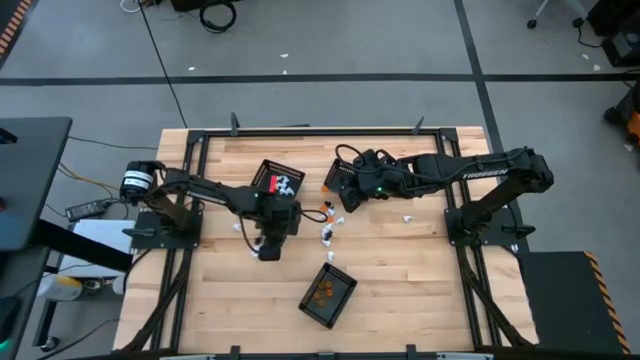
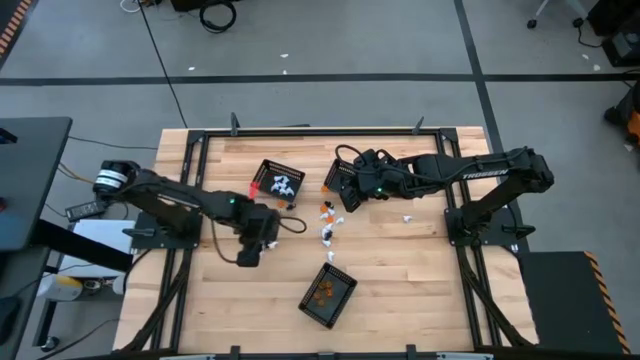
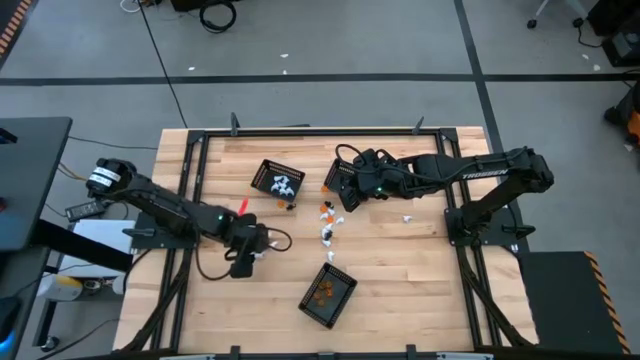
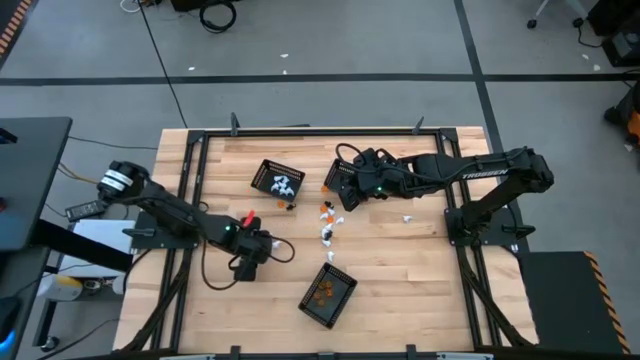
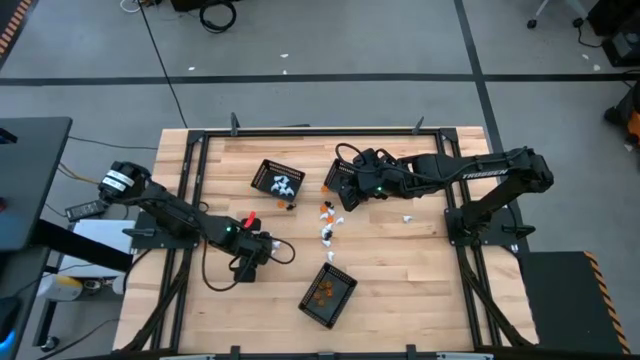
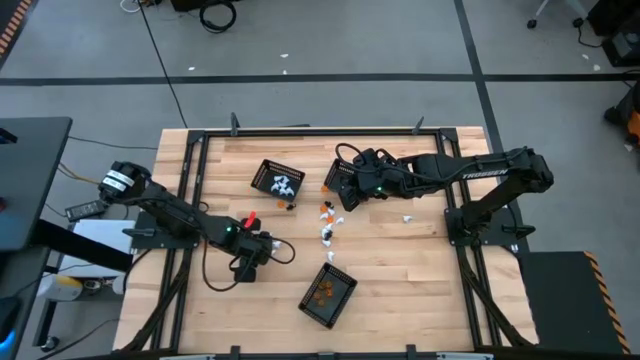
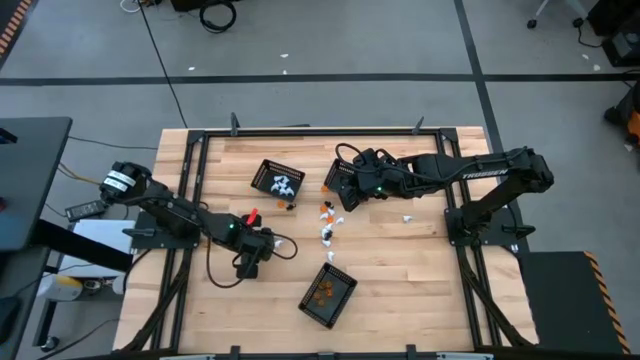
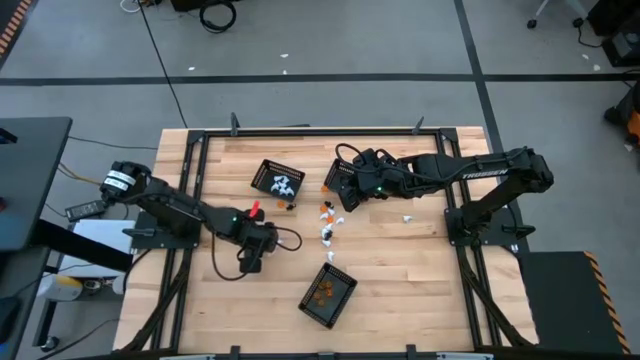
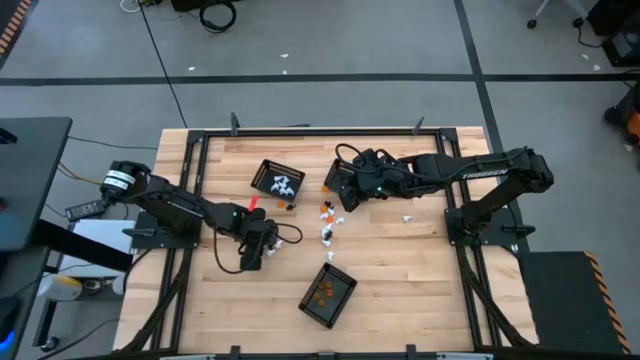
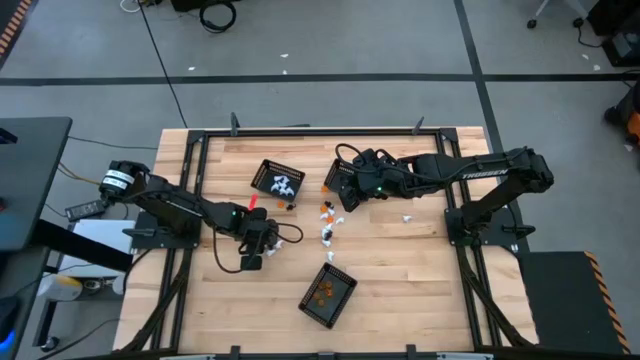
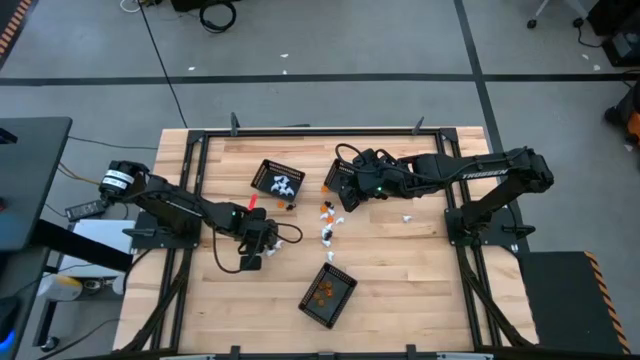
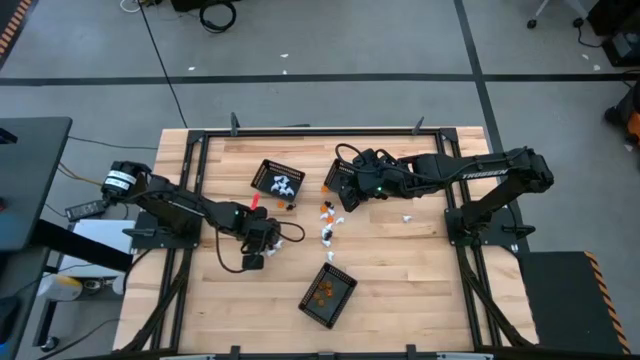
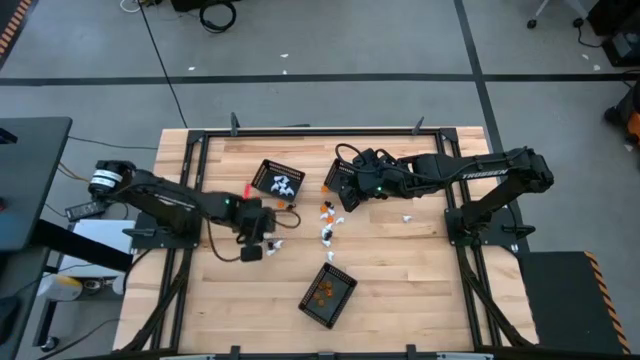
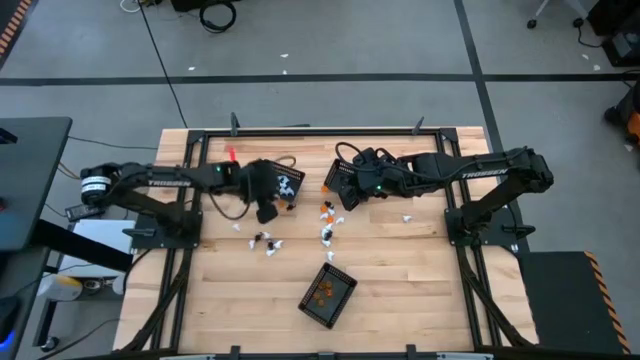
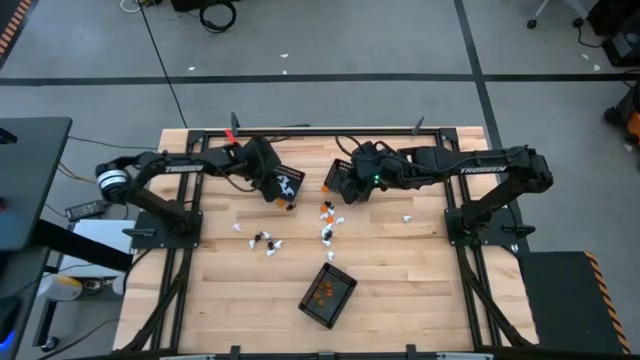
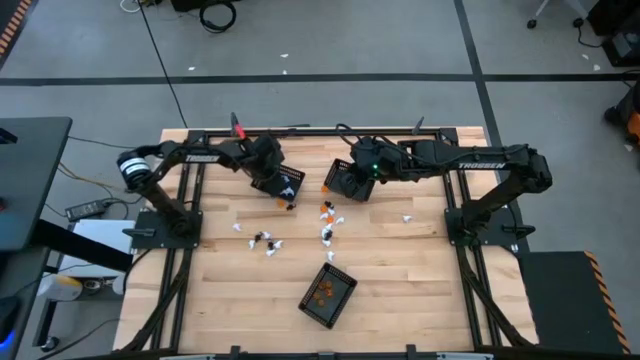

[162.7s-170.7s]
Task: Sort Halloween decoration
Put the white ghost toy into the top left black basket

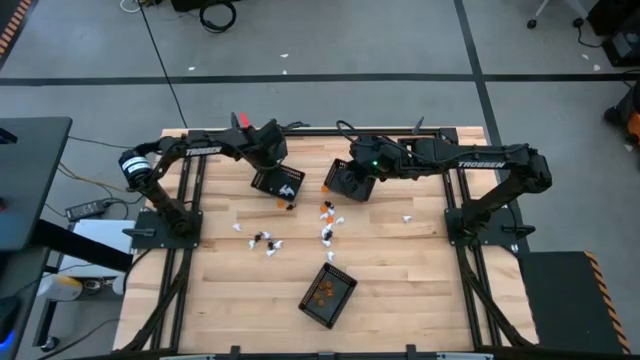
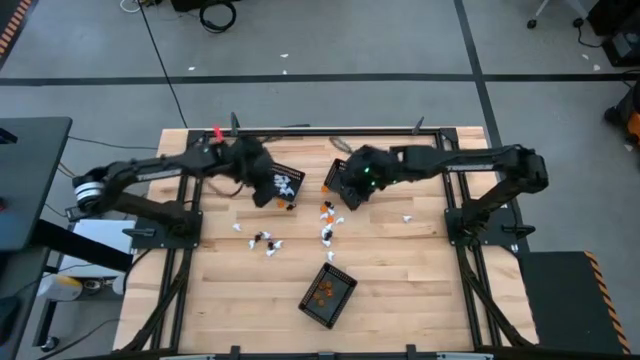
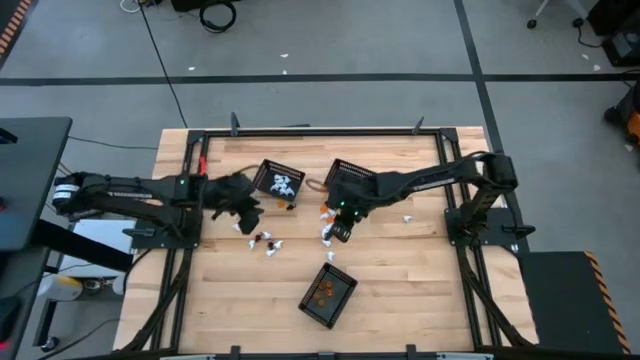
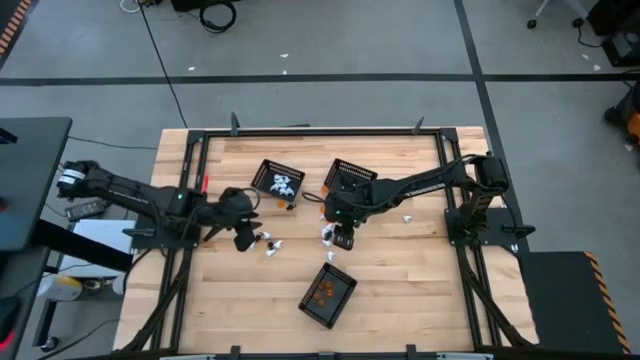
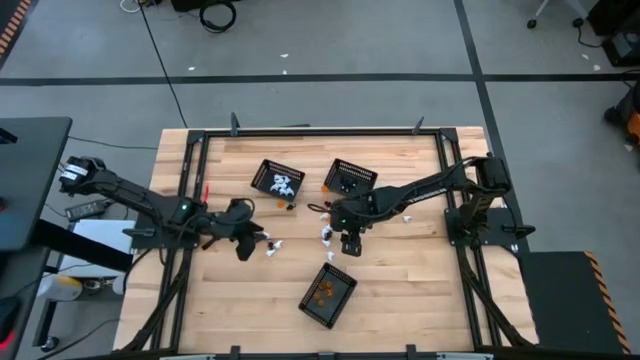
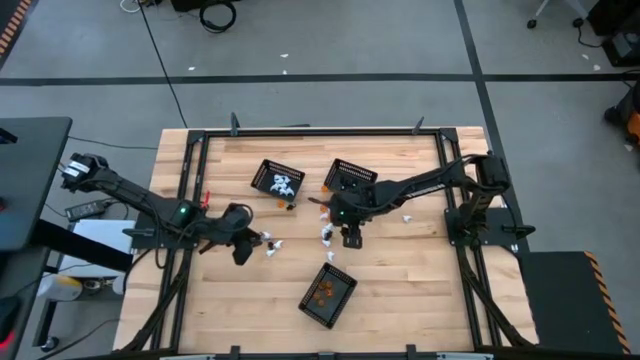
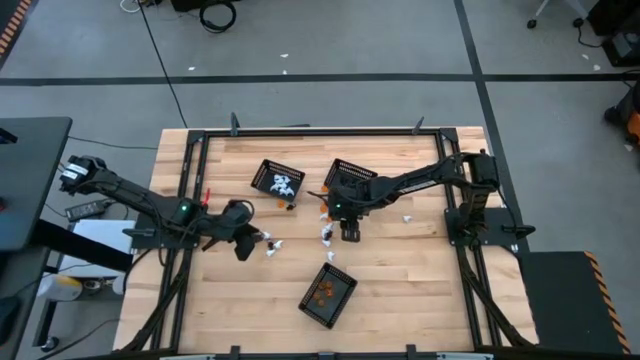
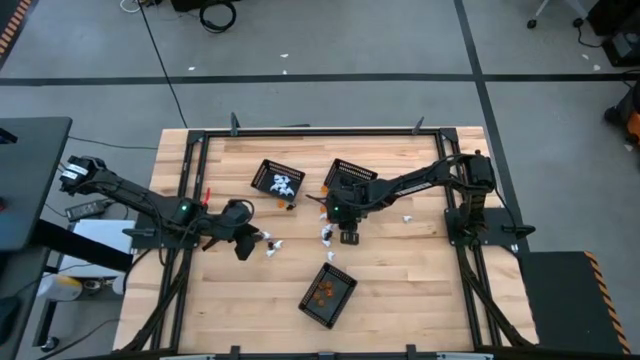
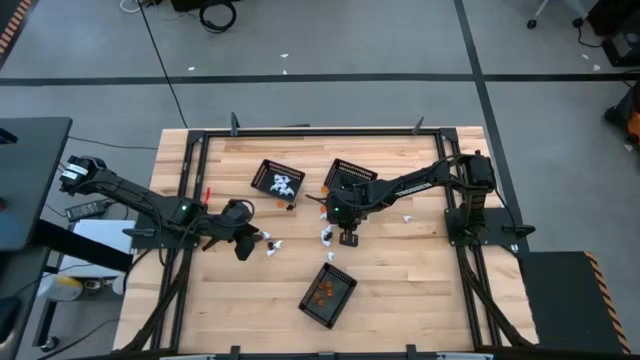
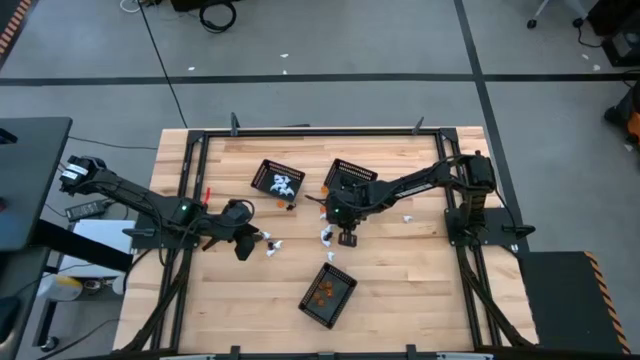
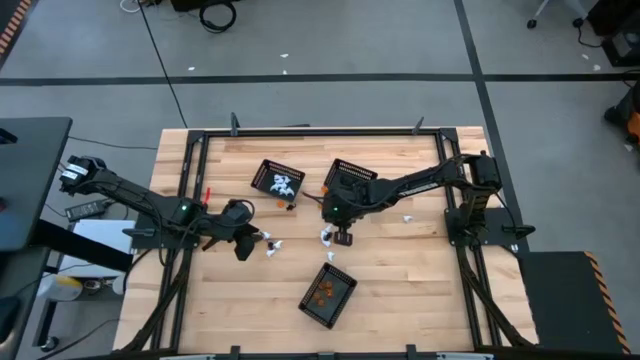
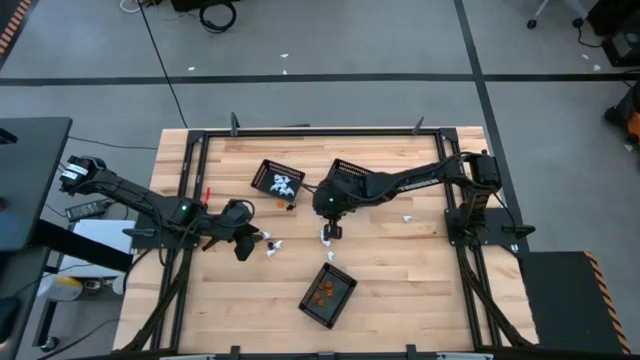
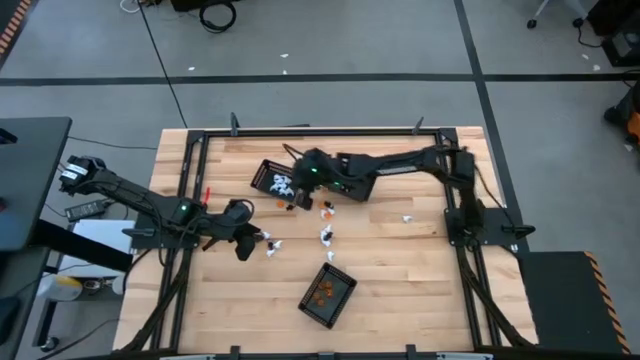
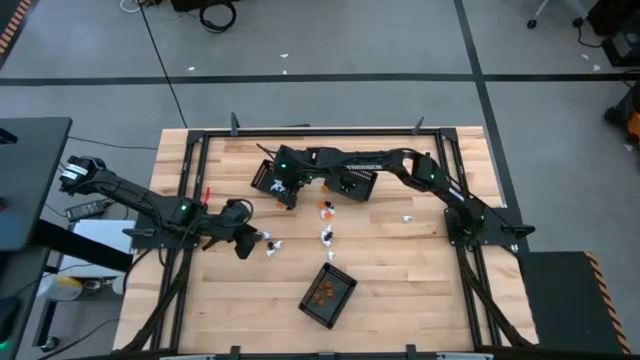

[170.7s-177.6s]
Put the white ghost toy into the top left black basket

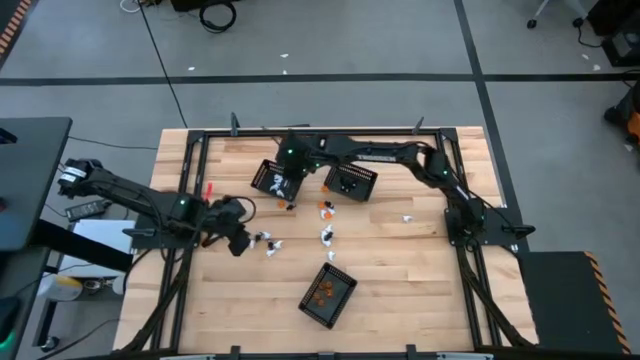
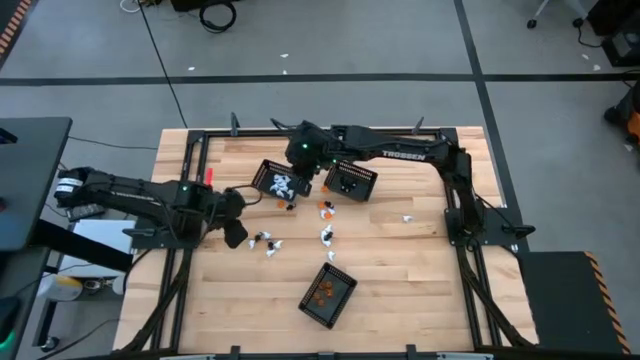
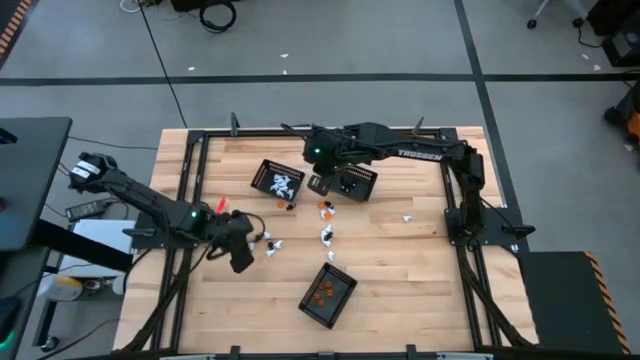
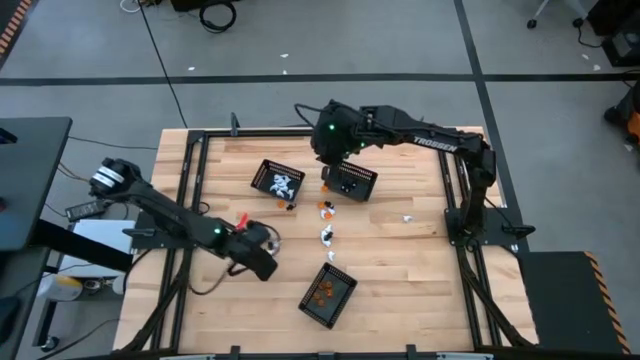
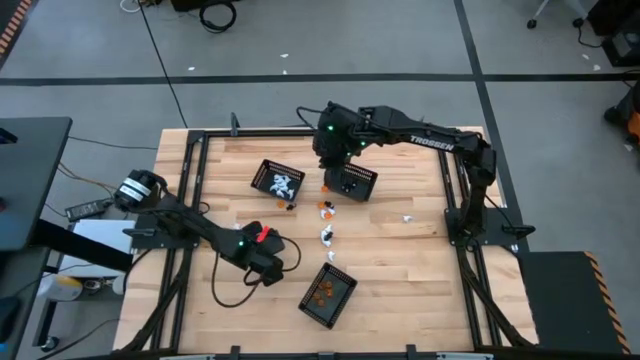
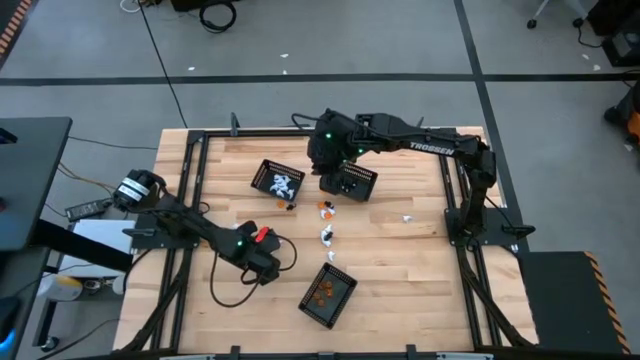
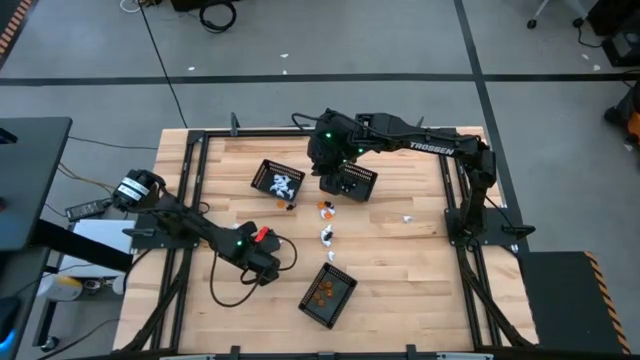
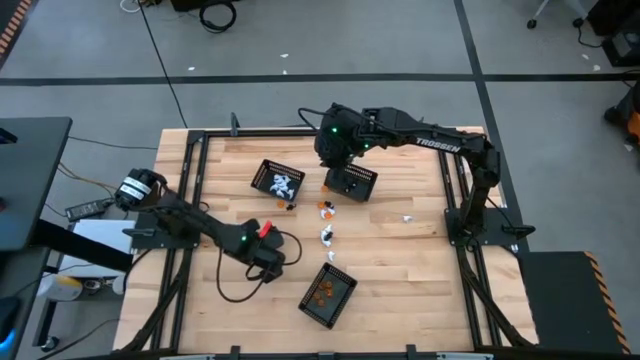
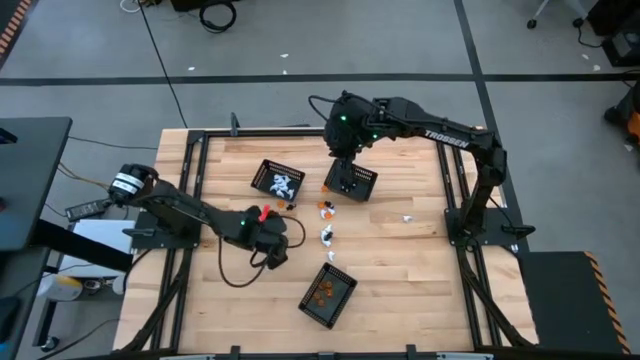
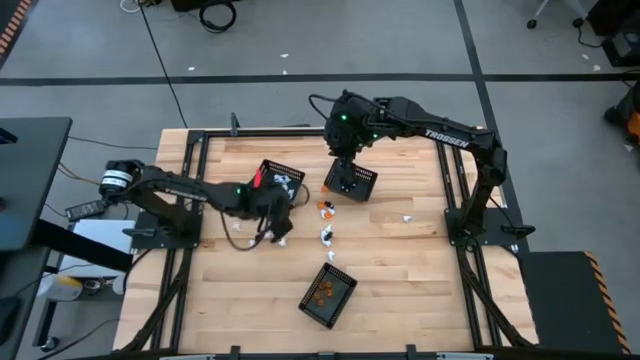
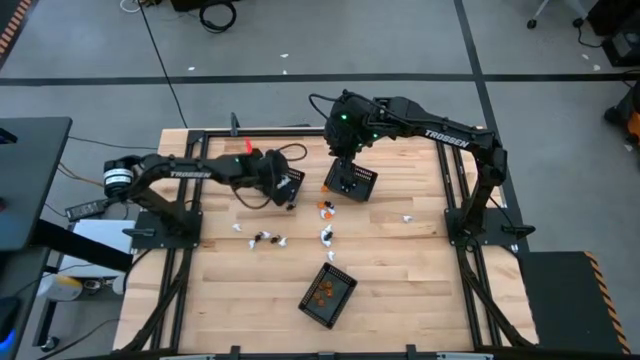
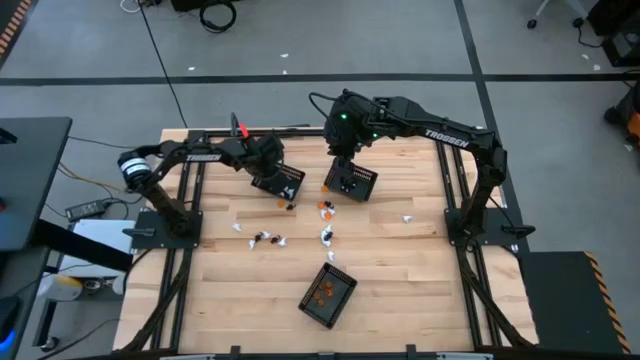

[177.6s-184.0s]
Put the white ghost toy into the top left black basket

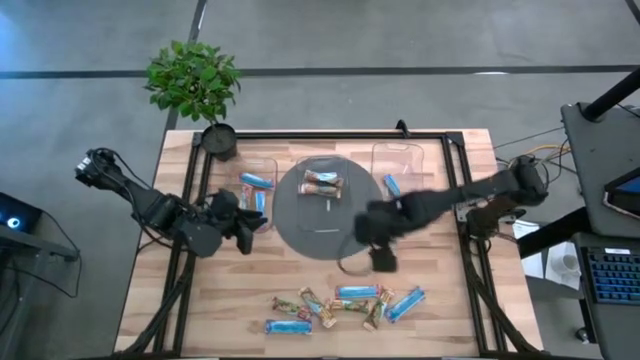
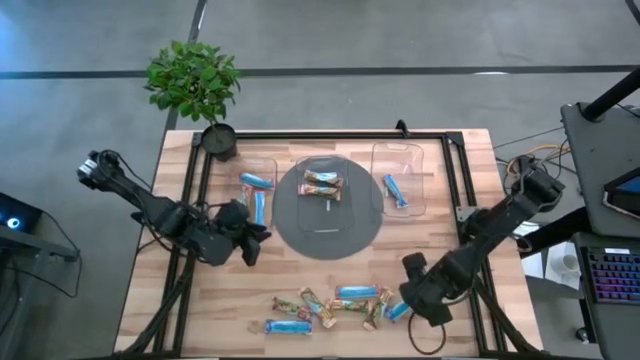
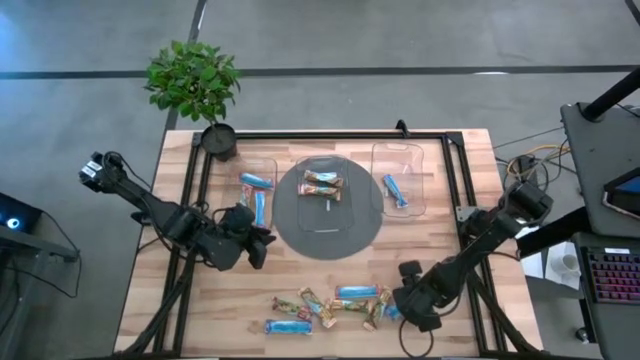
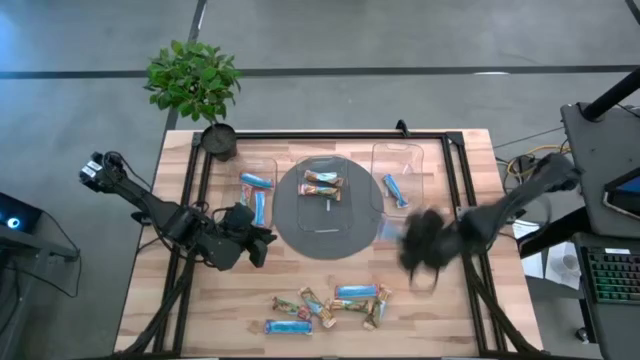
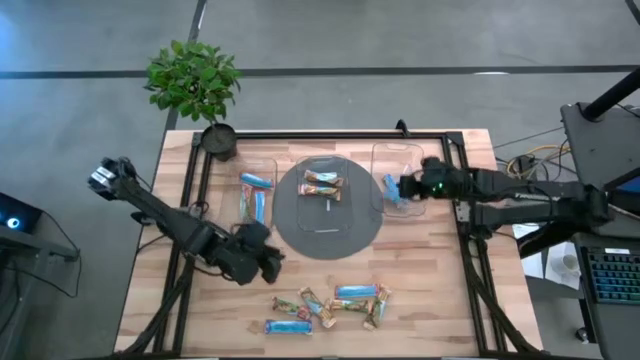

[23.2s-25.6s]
Task: Pick and place Granola Bars by type
Put the blue granola bar into the right transparent bin
